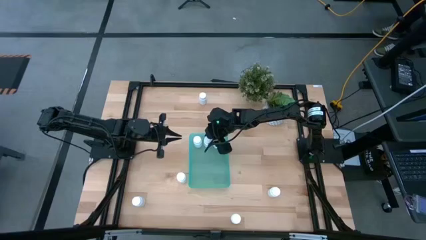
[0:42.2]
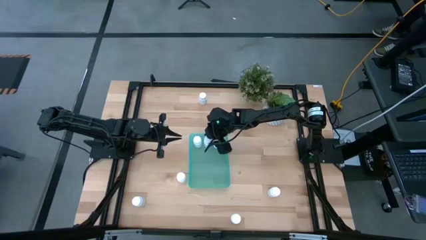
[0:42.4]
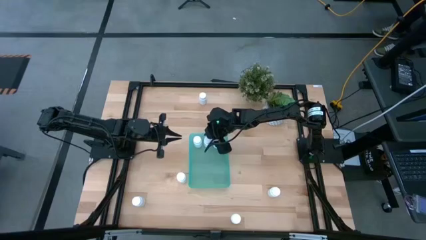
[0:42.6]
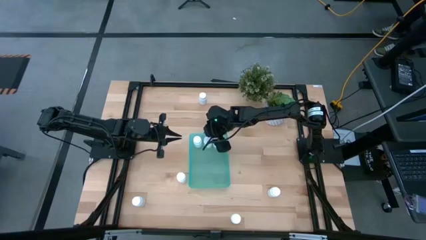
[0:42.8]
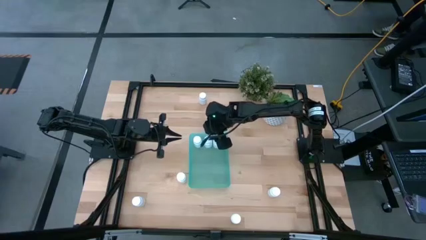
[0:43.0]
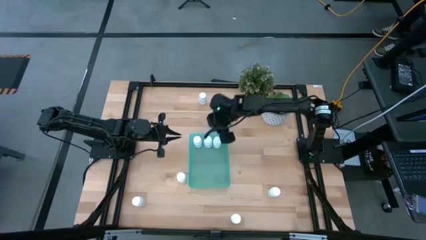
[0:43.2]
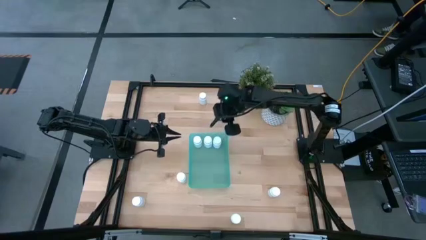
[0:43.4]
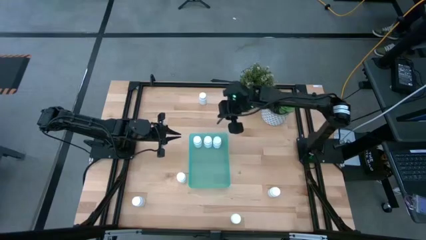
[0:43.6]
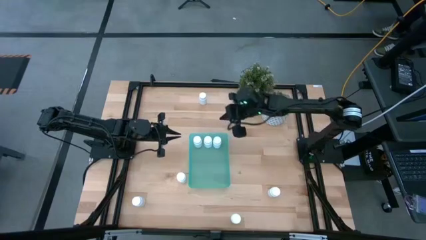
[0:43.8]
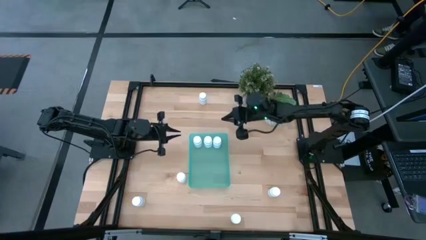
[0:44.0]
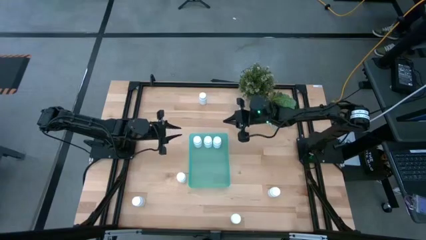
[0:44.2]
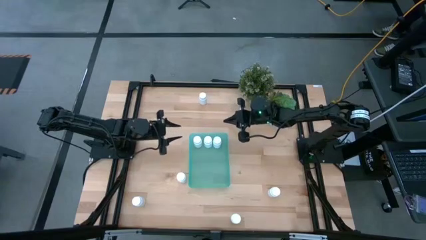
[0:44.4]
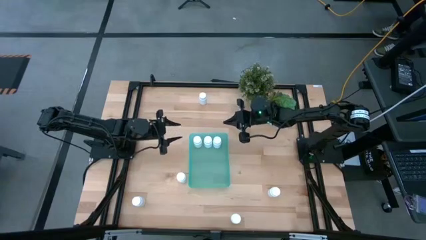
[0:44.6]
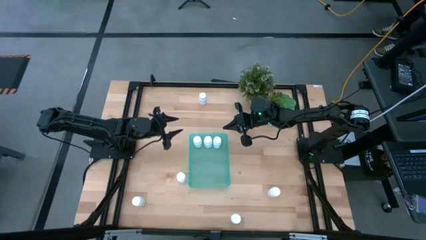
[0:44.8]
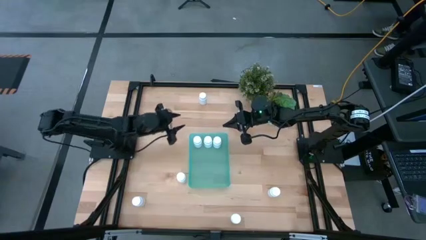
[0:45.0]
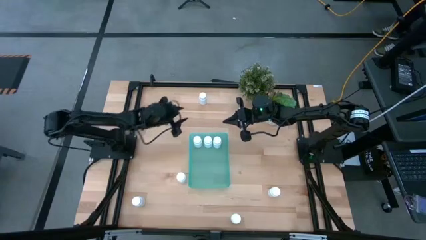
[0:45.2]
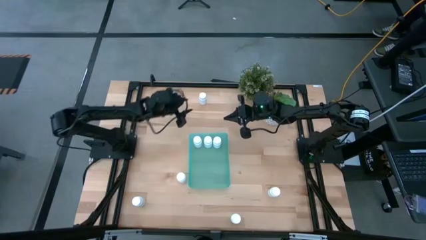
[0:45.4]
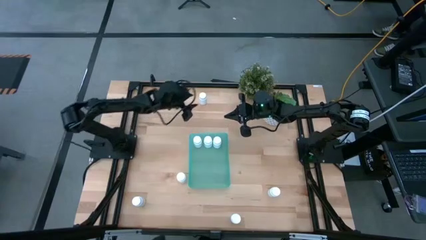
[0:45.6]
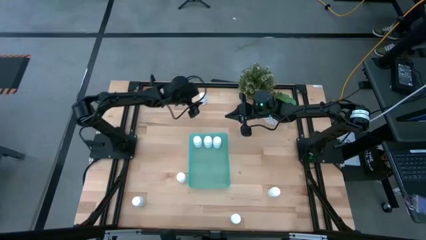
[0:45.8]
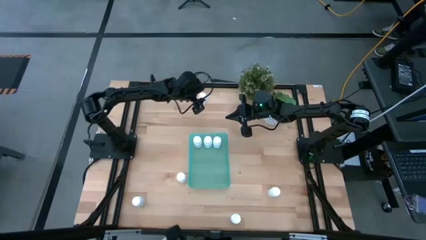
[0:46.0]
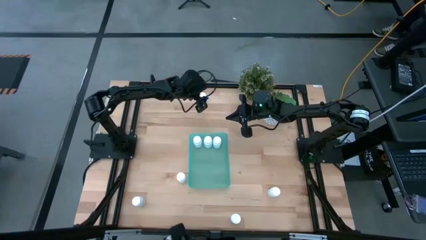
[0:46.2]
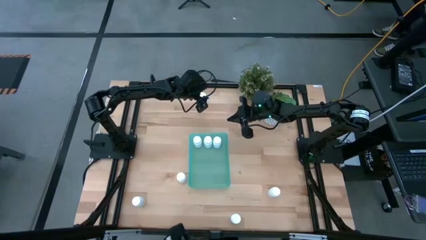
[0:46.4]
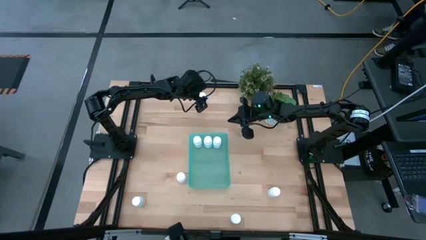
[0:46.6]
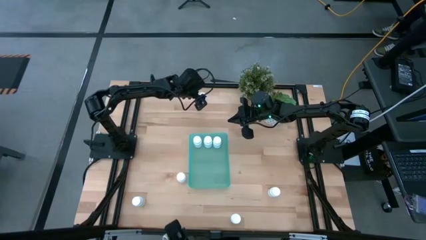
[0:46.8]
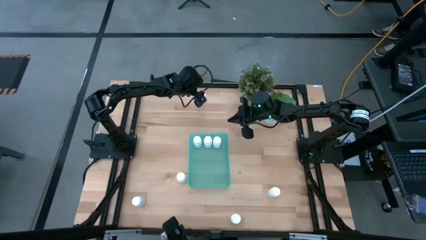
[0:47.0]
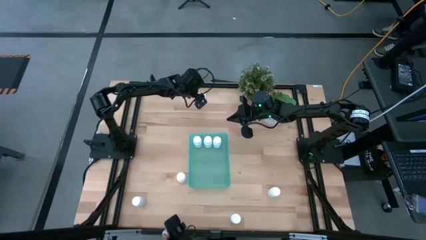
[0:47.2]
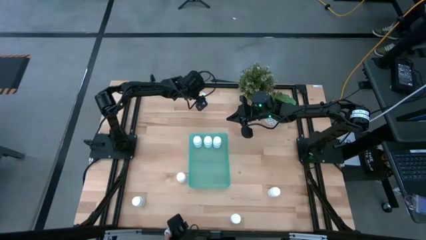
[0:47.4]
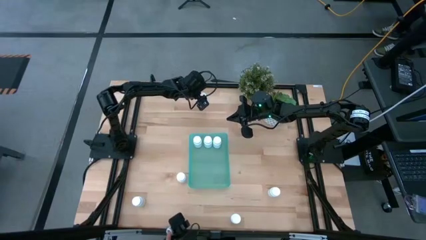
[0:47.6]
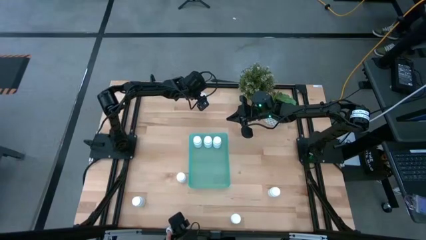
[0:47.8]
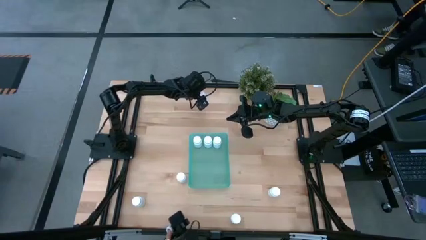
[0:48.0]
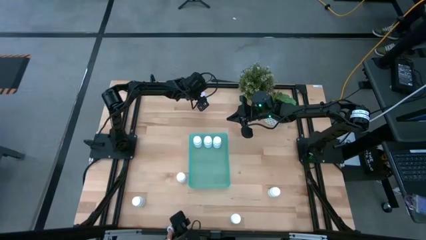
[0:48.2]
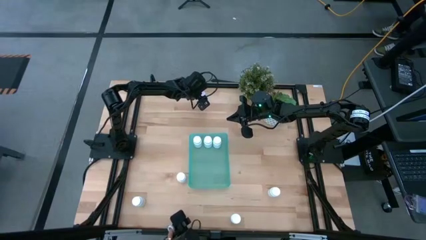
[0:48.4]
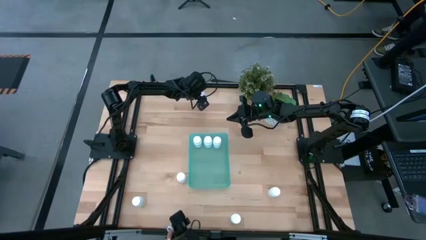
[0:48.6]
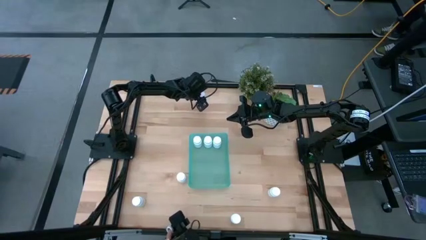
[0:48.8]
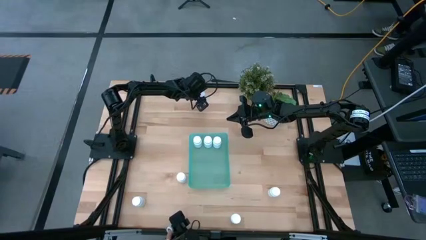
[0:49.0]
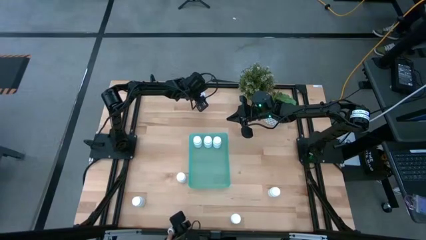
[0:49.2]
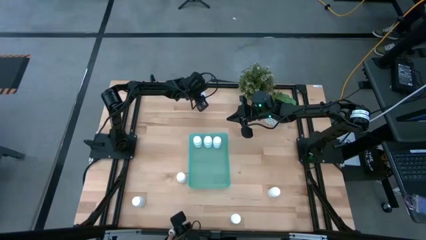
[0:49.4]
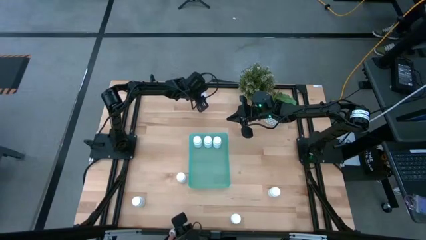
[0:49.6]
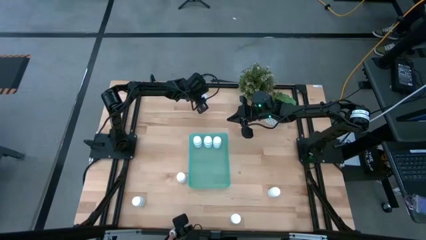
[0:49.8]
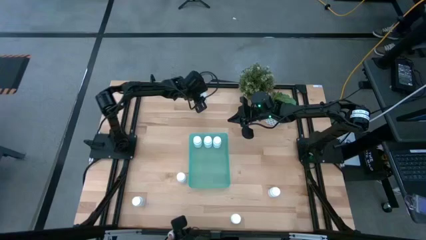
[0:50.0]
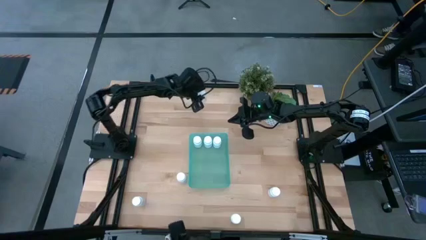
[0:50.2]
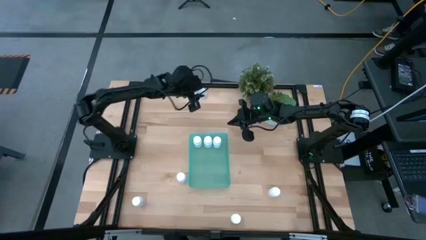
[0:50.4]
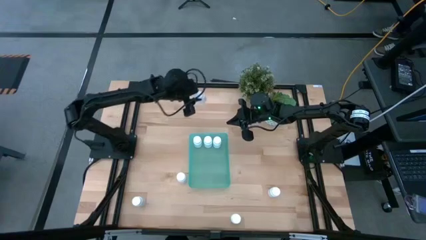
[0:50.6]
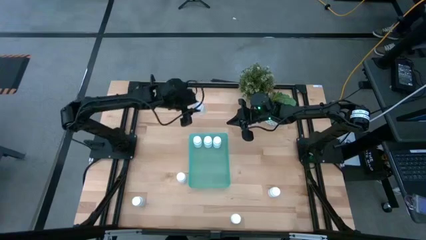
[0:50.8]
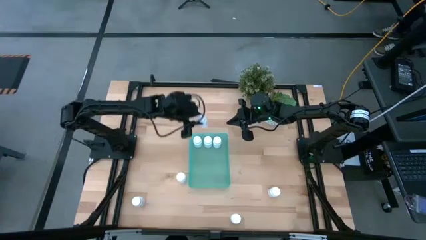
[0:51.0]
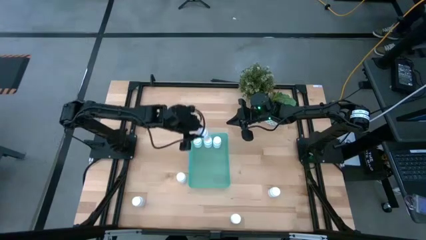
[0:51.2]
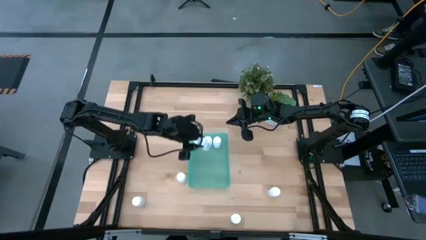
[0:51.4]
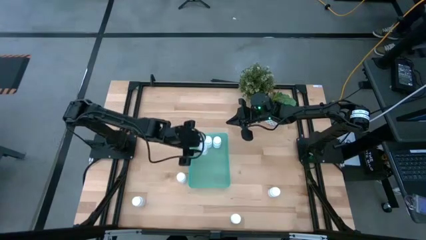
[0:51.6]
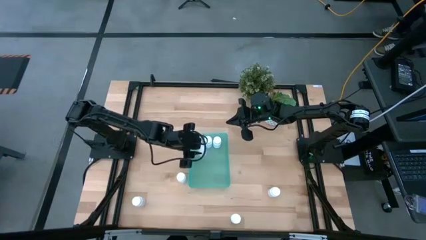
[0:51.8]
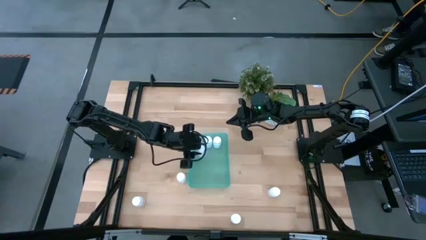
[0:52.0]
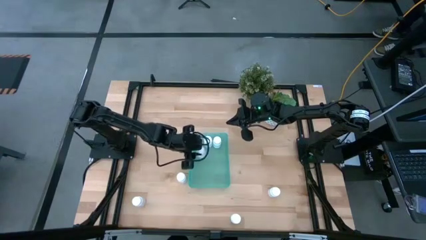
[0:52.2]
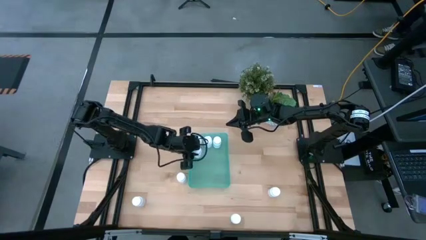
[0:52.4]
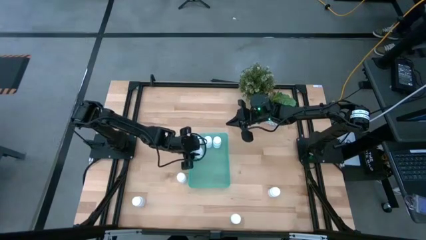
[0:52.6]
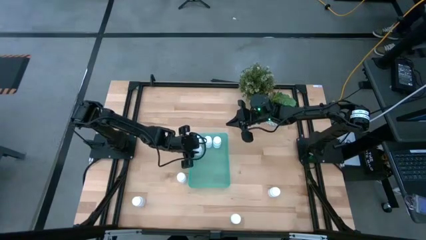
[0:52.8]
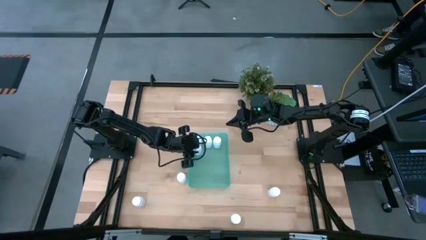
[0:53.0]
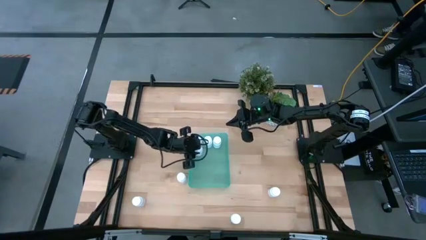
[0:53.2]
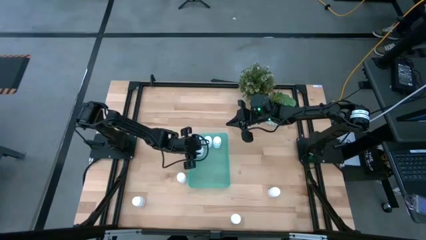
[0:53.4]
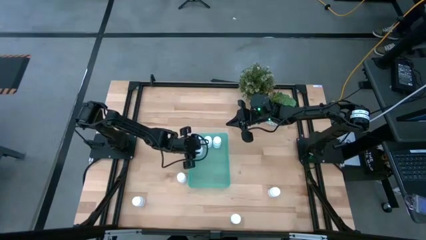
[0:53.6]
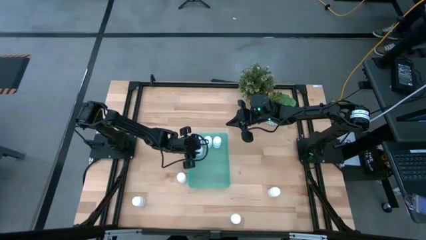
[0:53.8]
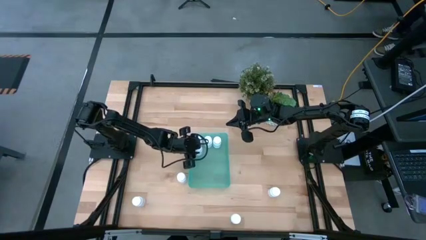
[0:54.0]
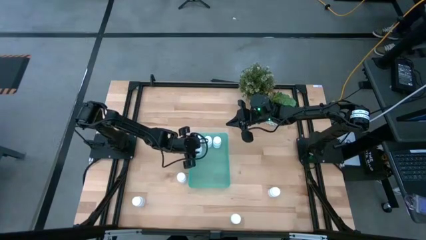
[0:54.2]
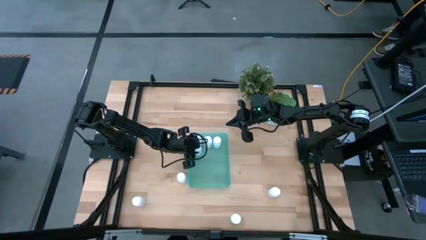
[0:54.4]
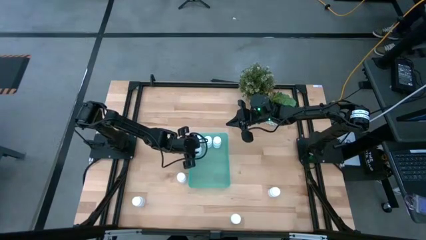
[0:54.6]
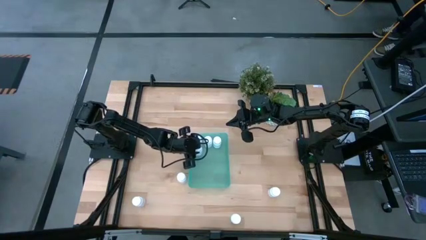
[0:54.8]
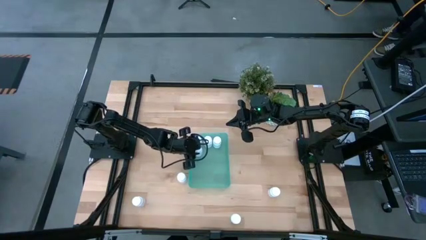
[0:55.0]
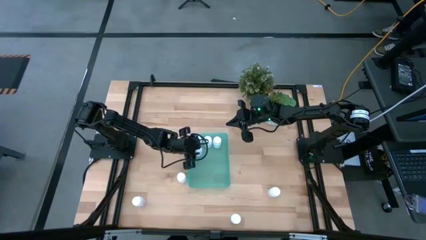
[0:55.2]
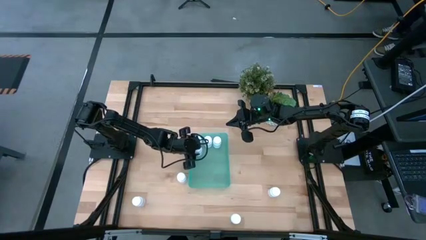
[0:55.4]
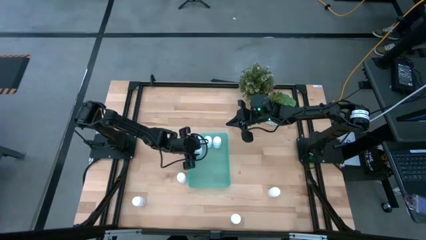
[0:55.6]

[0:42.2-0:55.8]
Task: Pick and place pill bottles into a basket
Put the white pill bottle into the green bin

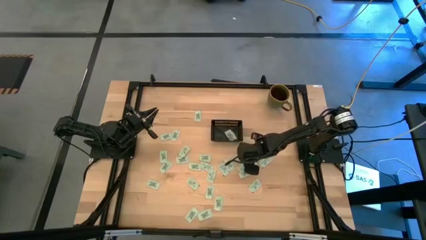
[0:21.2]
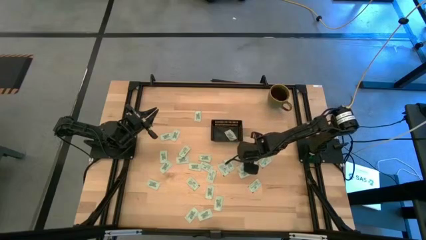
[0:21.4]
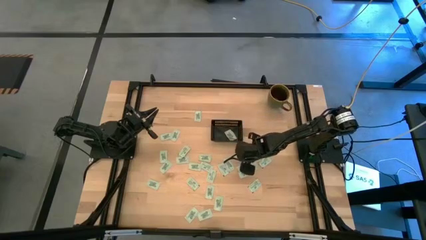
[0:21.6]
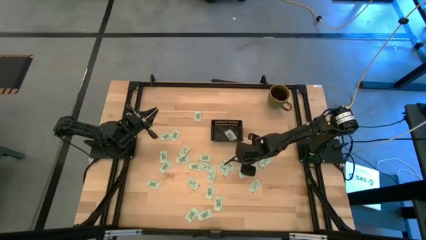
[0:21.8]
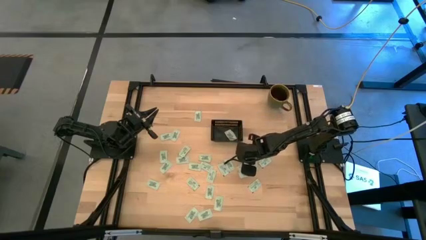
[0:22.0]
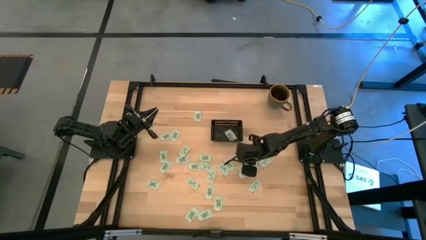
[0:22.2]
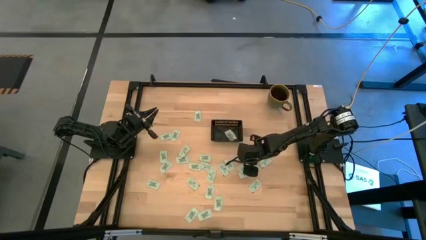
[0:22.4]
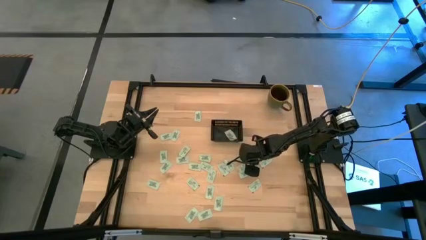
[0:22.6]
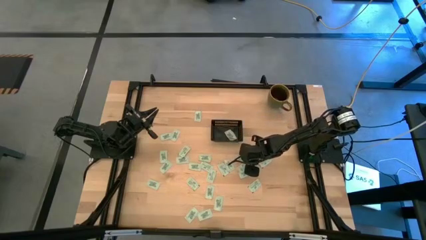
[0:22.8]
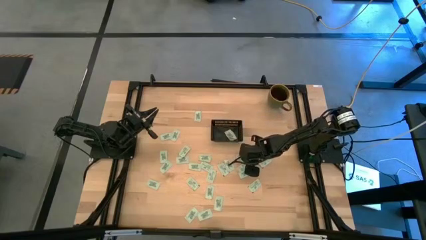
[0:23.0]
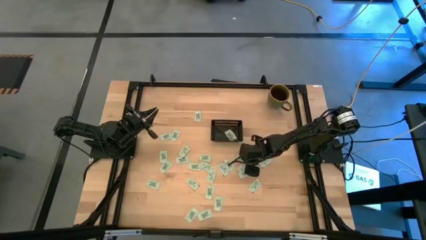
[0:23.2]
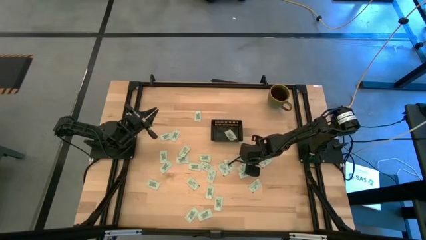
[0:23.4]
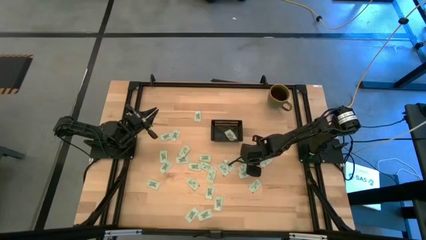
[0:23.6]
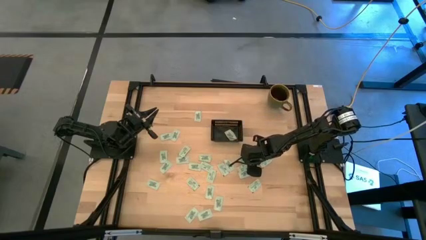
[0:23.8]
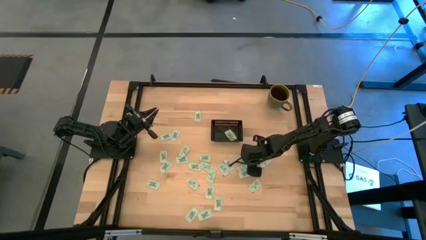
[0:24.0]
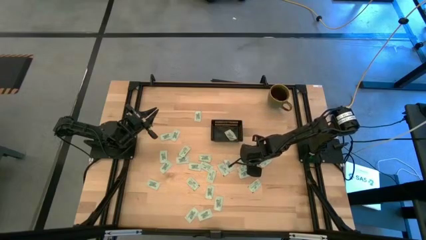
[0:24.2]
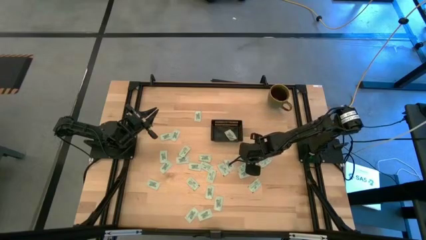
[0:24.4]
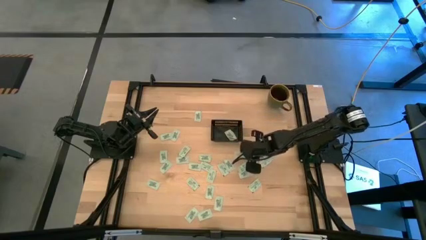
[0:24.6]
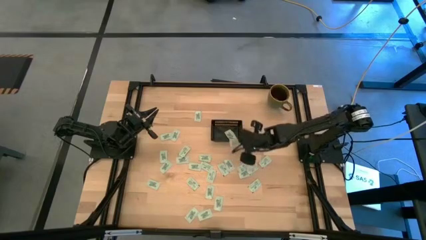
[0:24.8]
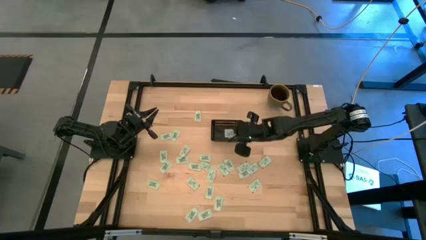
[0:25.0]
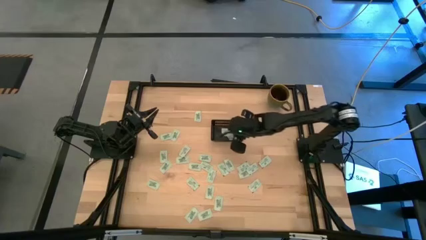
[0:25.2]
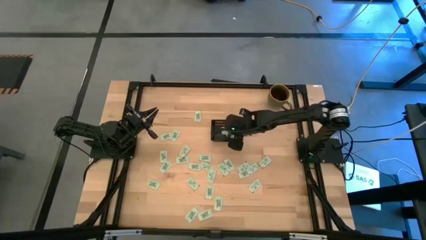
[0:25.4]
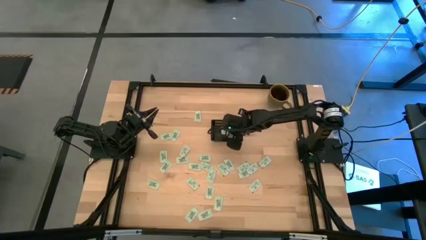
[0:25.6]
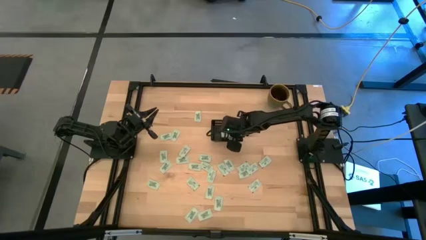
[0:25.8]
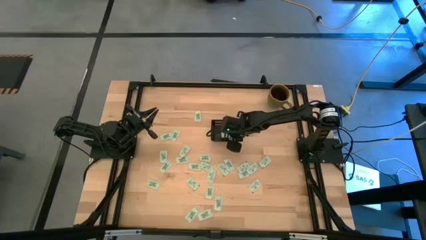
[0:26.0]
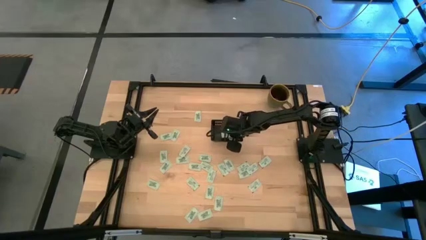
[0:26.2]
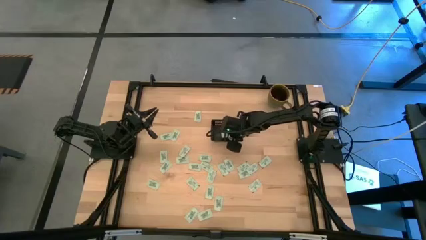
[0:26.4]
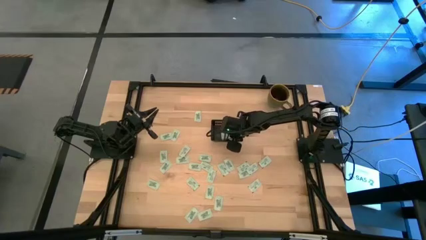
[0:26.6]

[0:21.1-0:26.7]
Task: Pick and place Stevia / Truvia into bins
Put the stevia packet into the black basket
